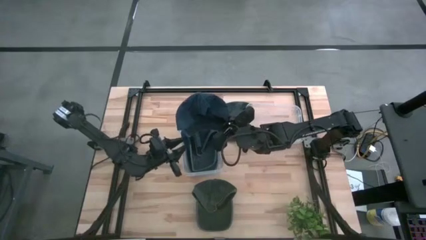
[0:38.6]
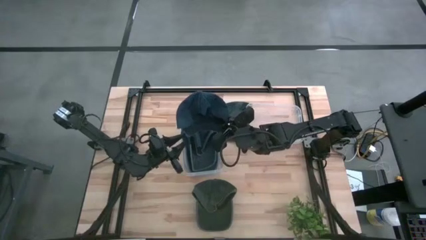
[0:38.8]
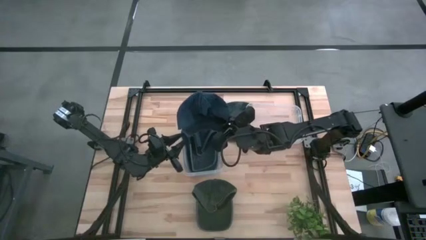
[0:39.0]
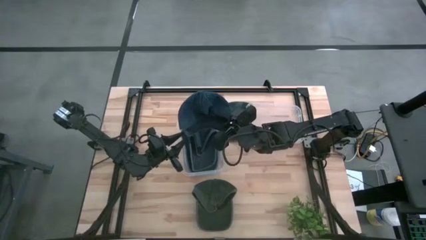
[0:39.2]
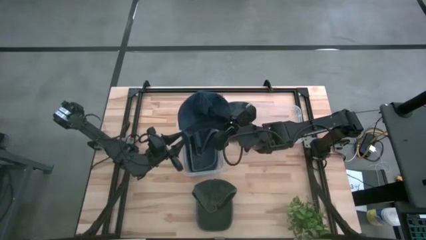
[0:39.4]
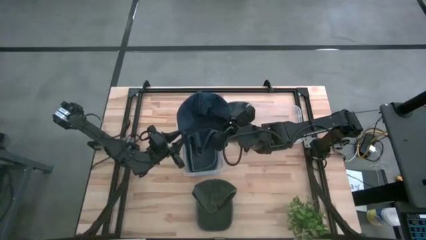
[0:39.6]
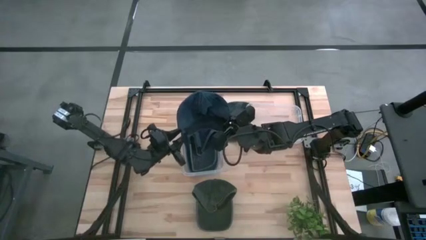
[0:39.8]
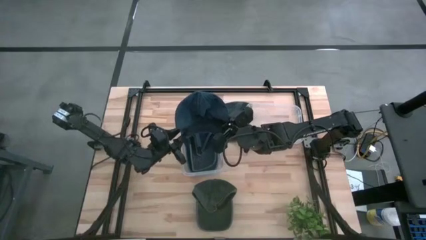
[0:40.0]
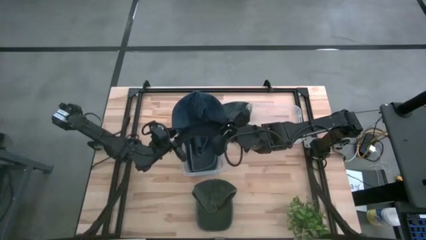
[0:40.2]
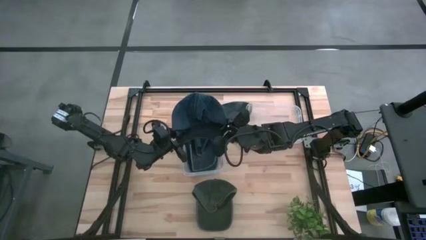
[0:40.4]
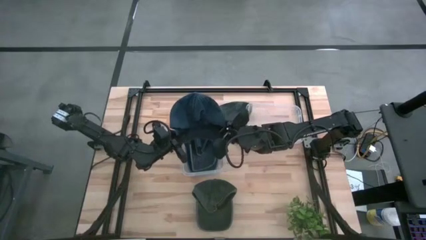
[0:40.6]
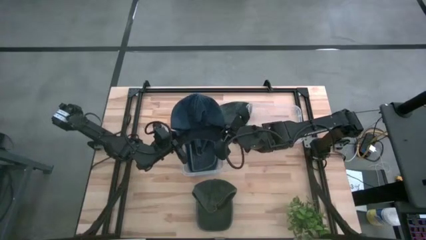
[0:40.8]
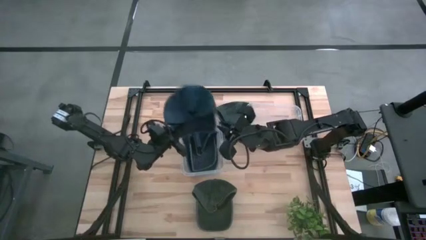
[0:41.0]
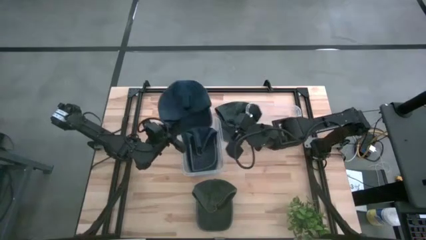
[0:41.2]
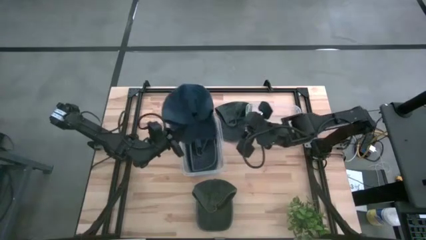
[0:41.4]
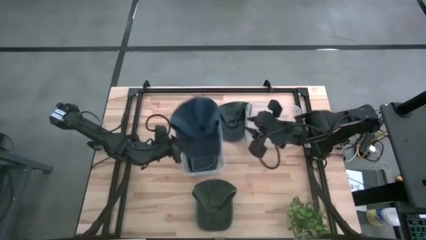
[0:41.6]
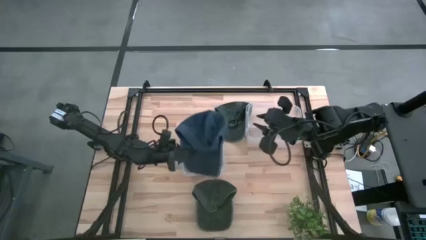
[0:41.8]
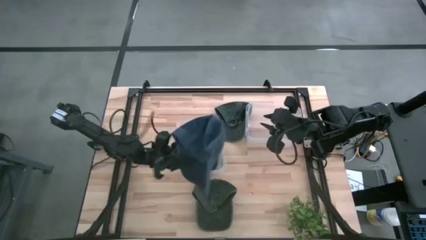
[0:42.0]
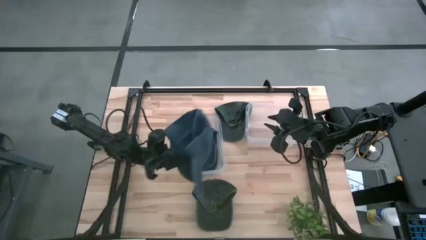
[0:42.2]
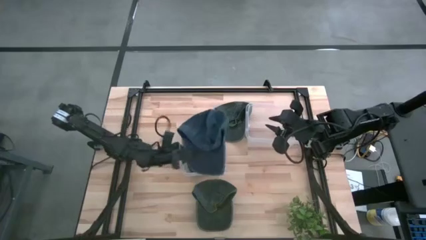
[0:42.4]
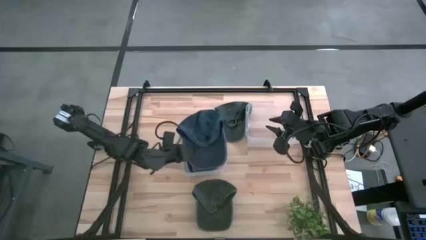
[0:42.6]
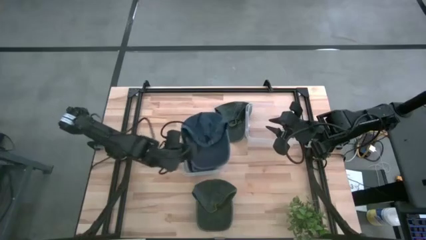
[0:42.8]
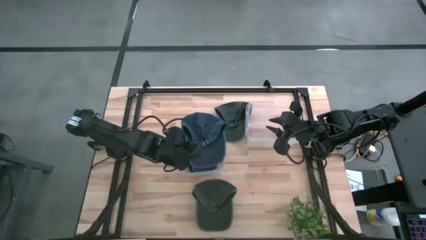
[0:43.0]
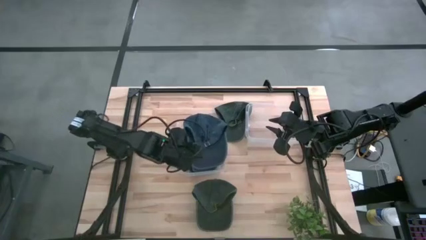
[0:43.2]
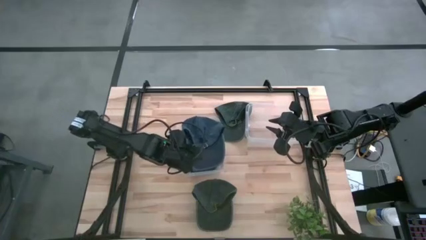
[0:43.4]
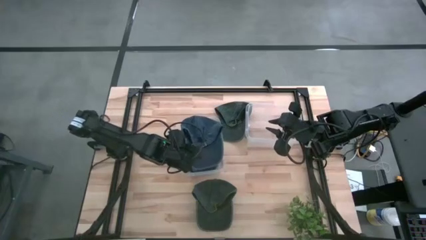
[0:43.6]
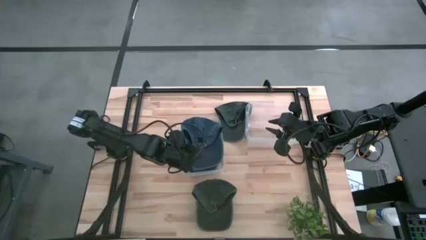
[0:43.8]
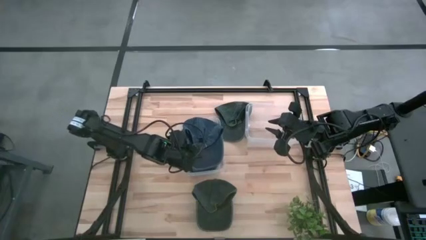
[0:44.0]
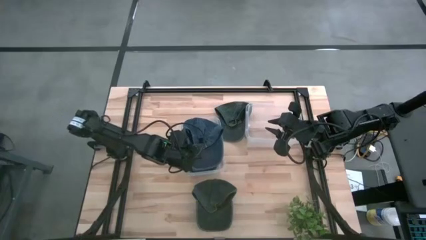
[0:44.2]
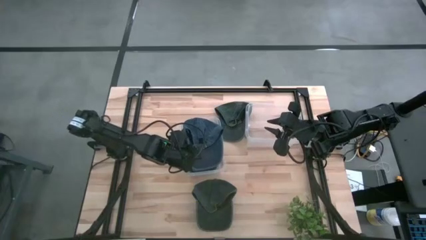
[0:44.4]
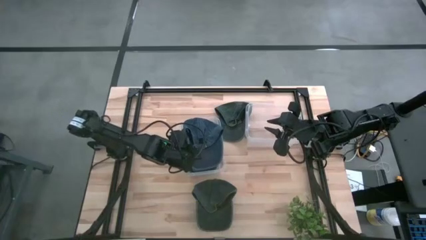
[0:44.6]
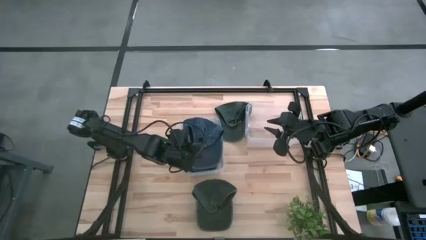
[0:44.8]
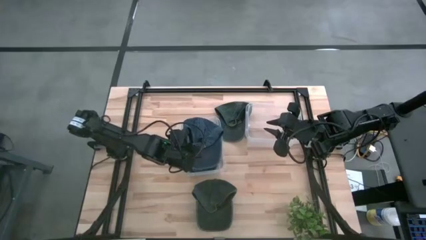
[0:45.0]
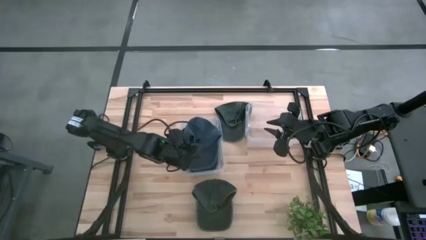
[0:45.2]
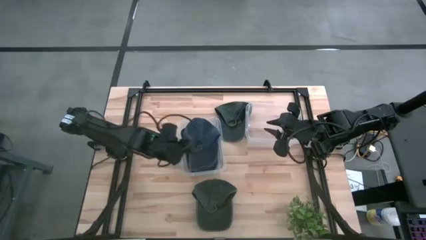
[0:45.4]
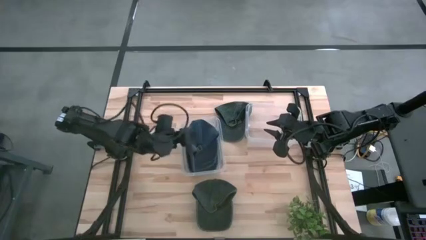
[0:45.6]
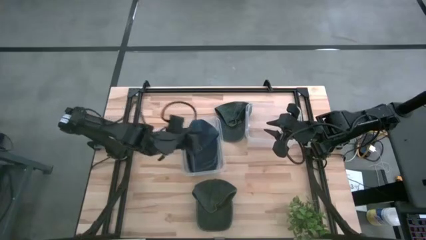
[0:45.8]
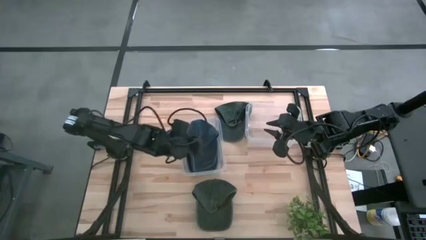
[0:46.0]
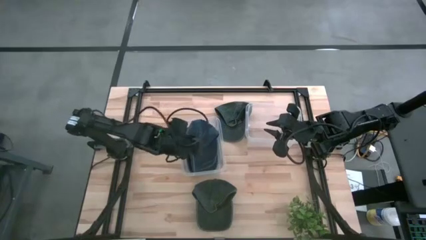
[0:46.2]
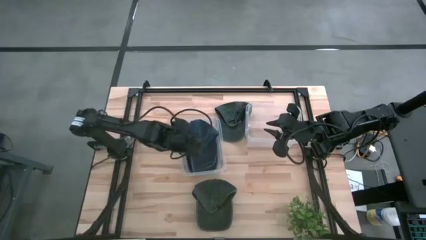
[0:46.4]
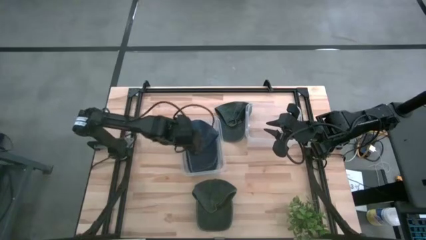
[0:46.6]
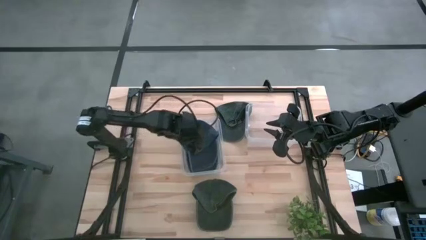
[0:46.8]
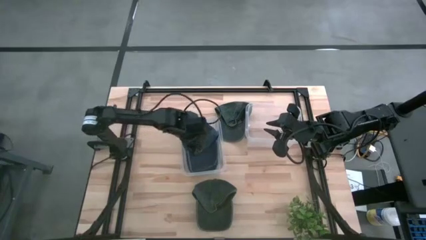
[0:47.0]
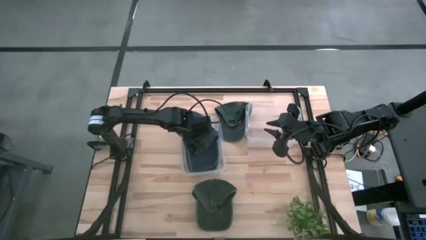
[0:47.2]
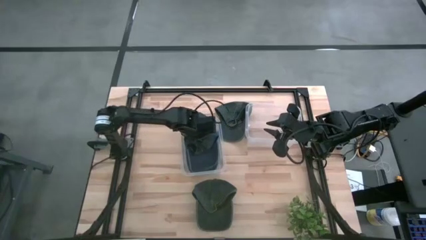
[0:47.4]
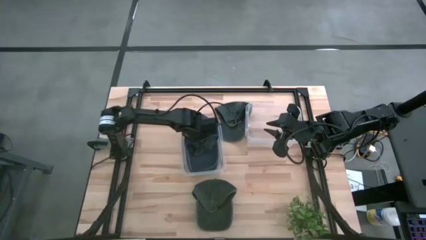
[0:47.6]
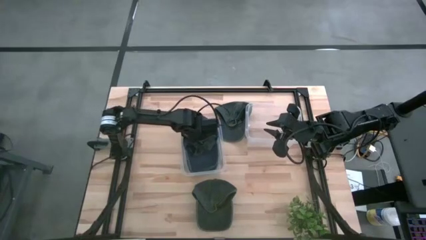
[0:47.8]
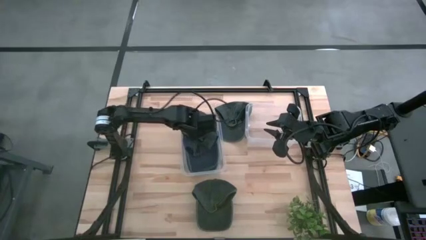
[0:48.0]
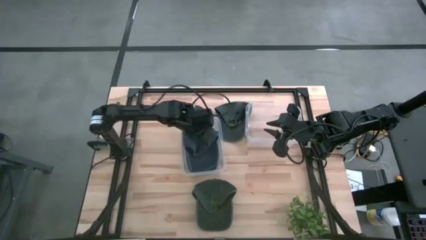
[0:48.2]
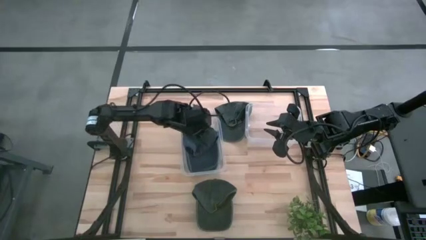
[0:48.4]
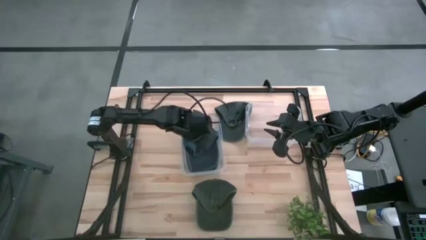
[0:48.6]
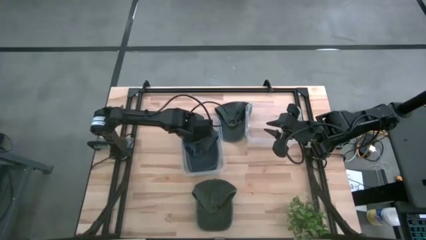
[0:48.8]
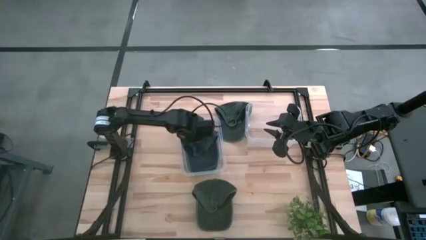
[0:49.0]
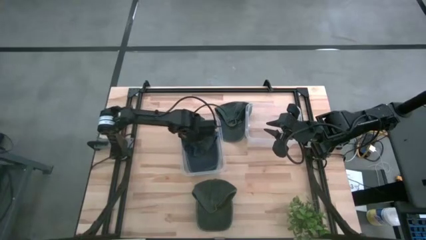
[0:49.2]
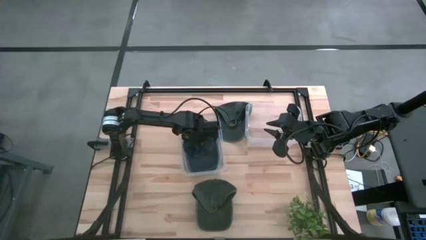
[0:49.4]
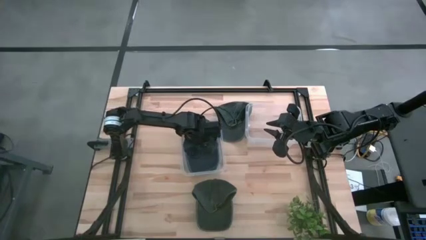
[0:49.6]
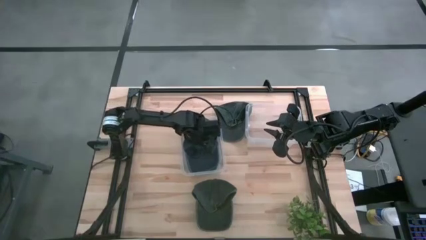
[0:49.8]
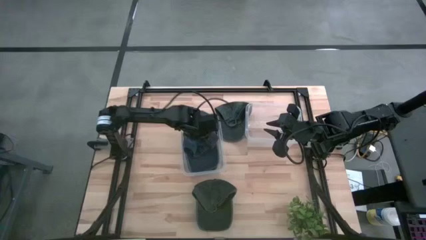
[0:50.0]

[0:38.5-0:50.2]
Task: Pick and place caps into container
Put the blue cap into the left transparent container

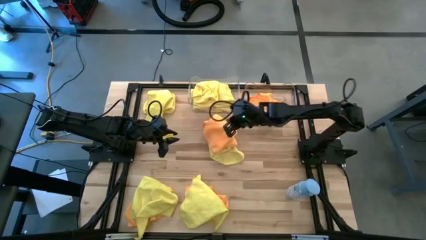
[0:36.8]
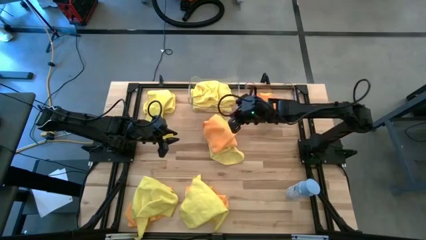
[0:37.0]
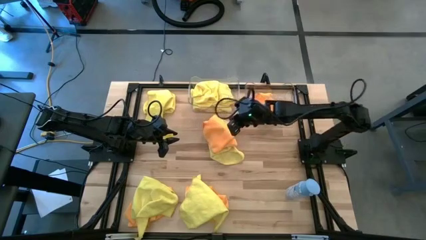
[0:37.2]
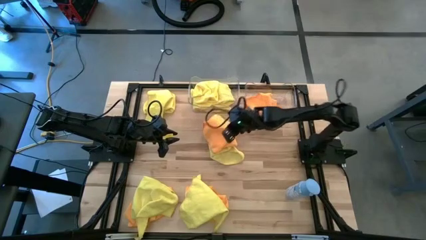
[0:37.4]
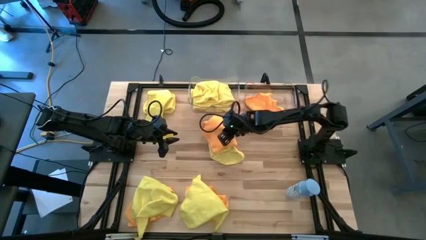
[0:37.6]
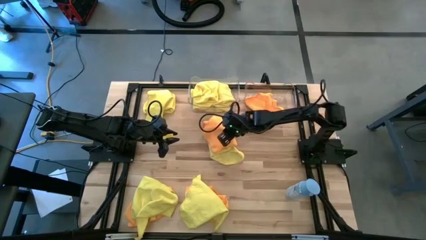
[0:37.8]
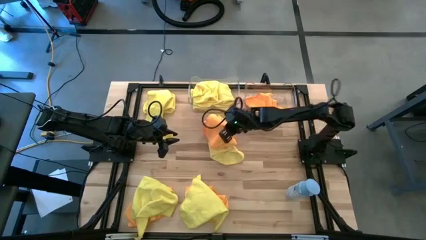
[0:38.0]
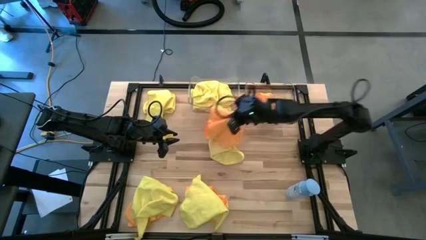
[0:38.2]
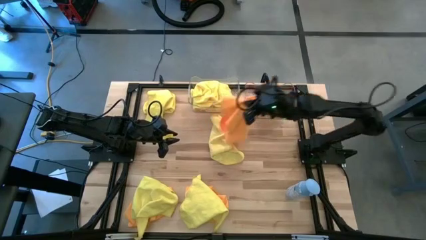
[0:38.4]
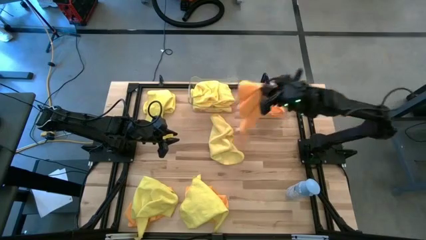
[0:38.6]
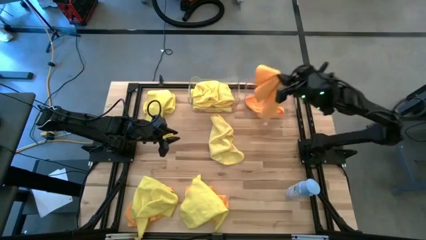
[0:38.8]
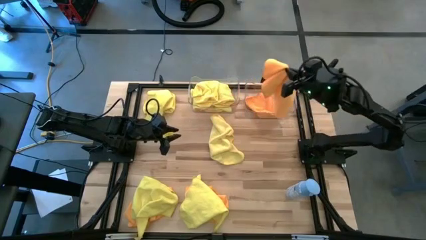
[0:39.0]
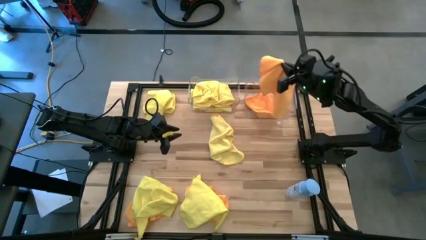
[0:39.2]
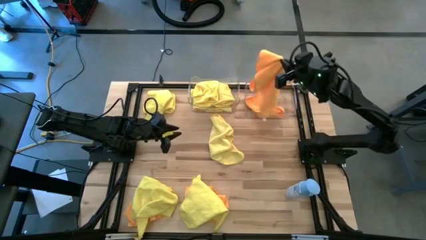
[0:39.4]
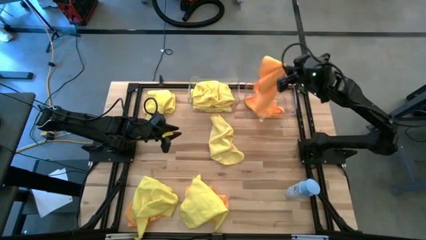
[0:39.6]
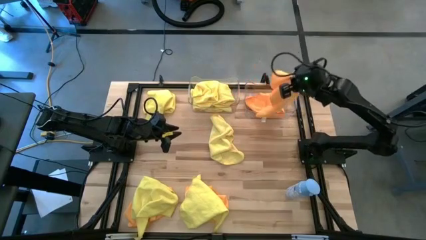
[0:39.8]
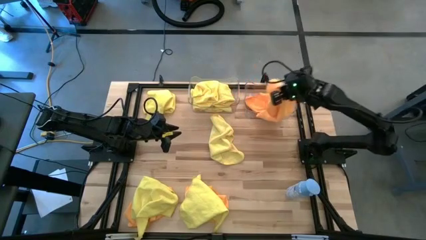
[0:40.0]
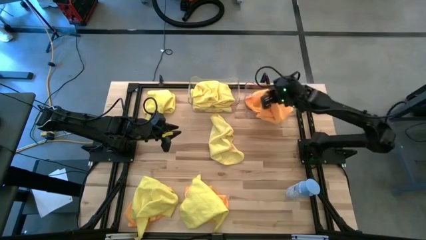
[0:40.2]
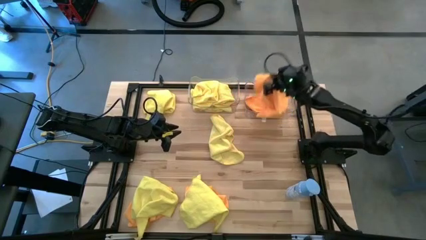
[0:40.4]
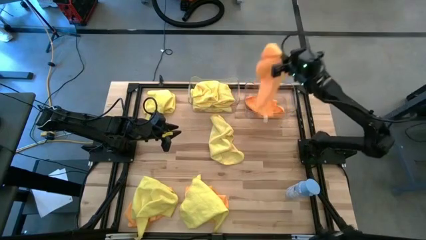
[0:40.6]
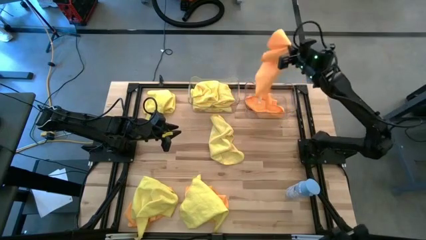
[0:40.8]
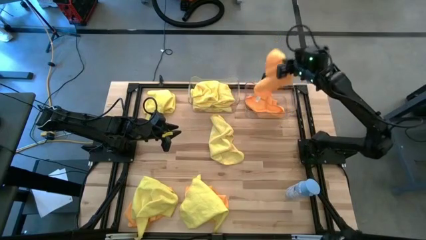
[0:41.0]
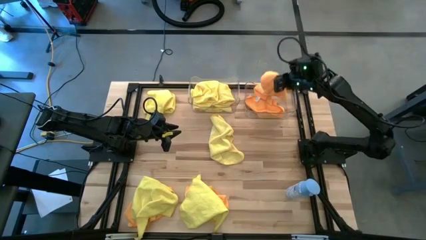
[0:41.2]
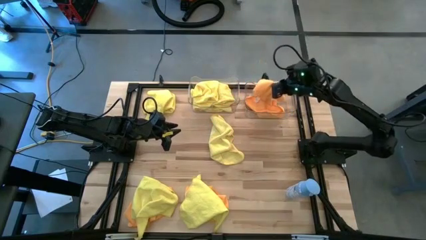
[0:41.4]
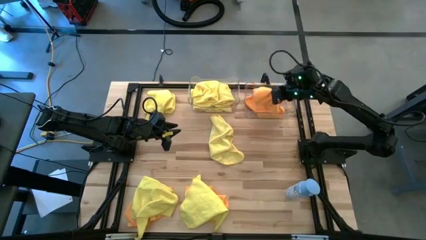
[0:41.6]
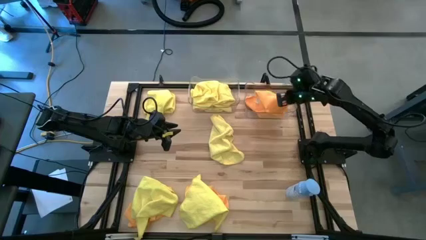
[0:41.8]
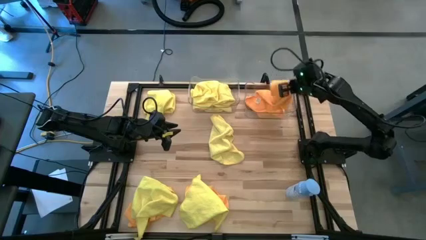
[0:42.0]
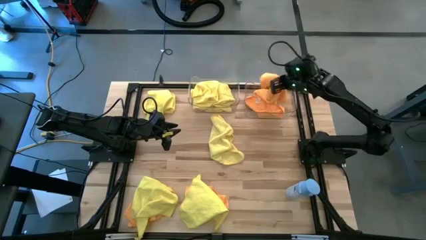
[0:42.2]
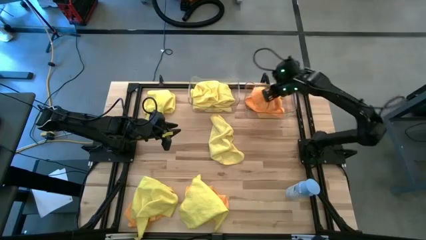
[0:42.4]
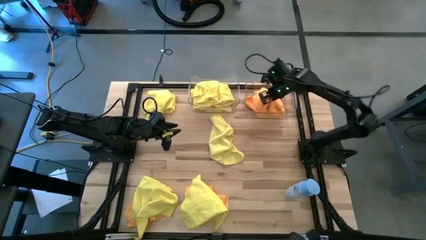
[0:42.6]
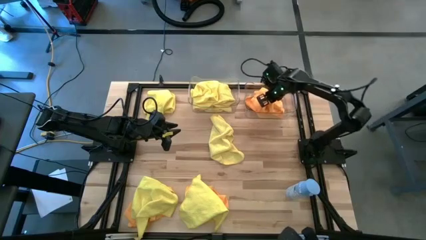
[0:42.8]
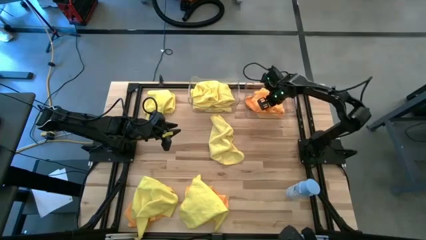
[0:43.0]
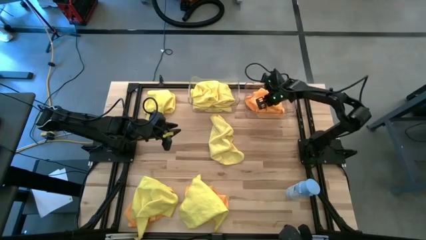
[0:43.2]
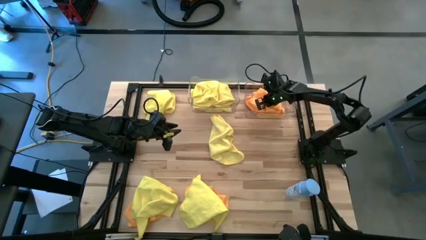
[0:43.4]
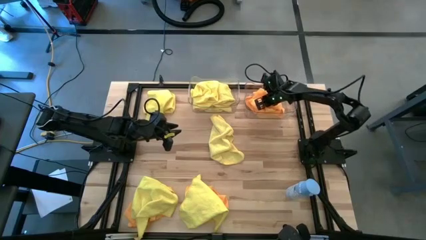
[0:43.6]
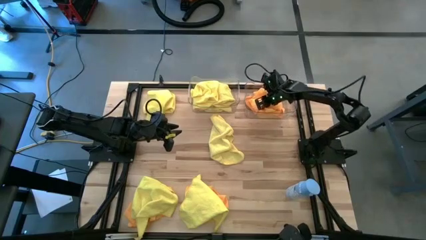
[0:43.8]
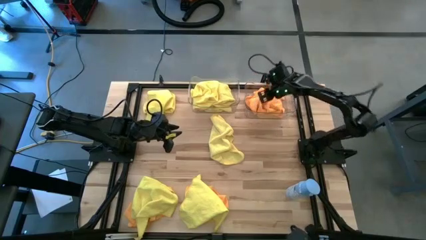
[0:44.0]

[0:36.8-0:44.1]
Task: Sort microfiber towel by color & place in baskets
Put the orange microfiber cloth into the right transparent bin
